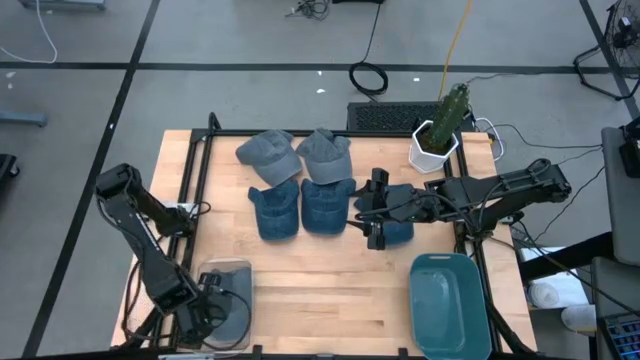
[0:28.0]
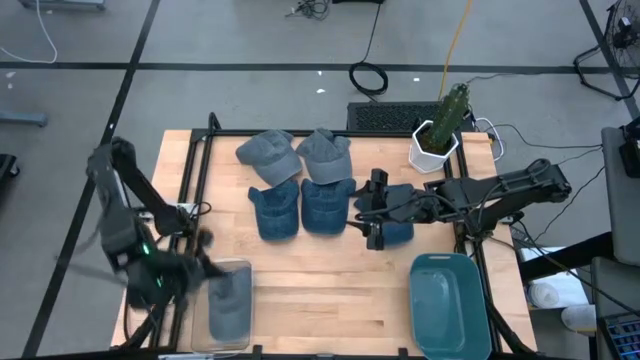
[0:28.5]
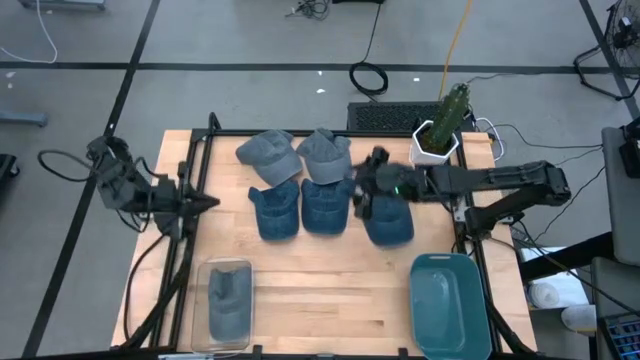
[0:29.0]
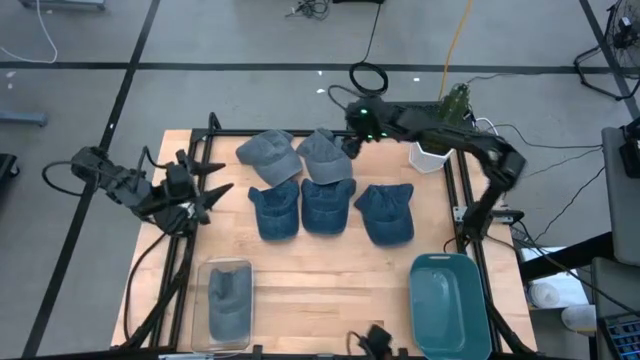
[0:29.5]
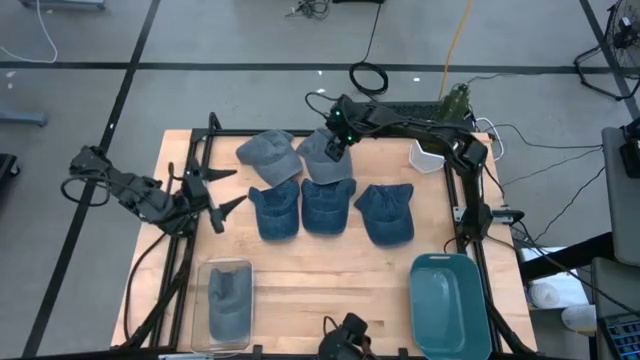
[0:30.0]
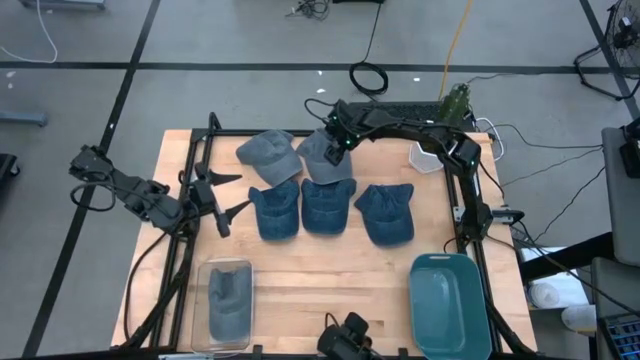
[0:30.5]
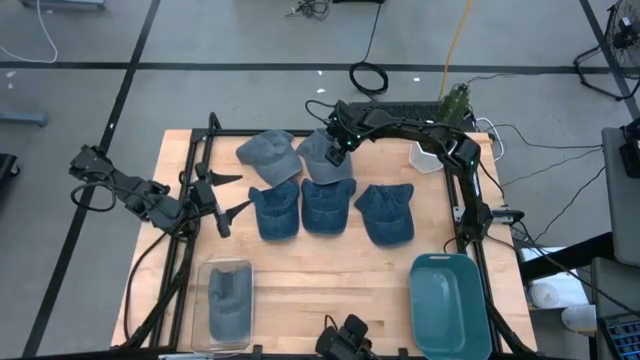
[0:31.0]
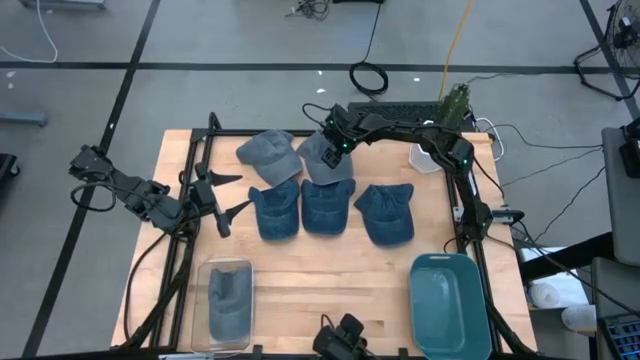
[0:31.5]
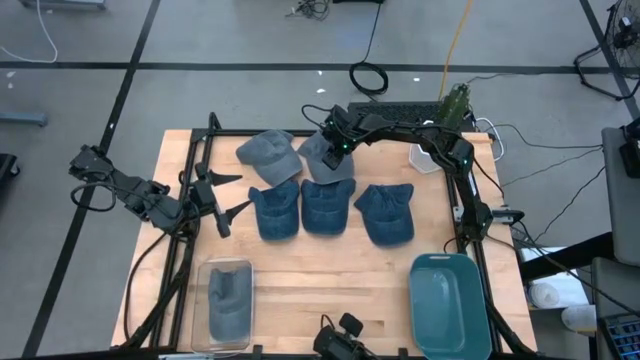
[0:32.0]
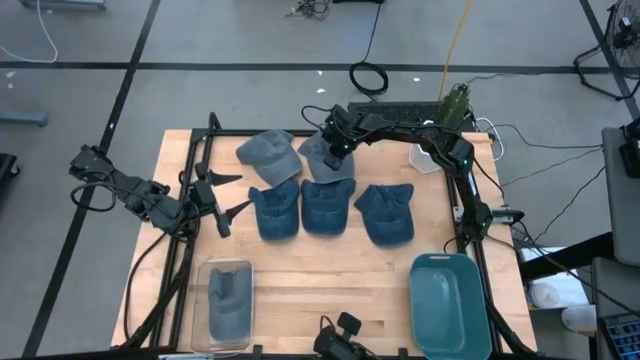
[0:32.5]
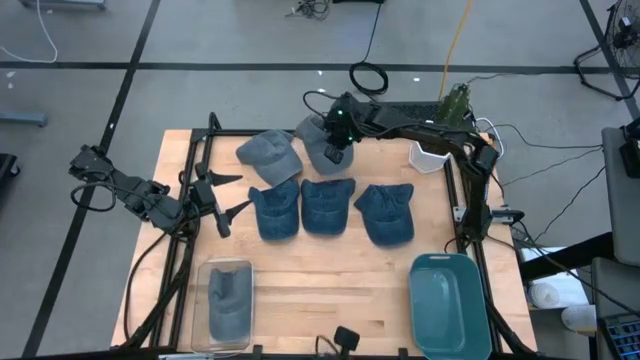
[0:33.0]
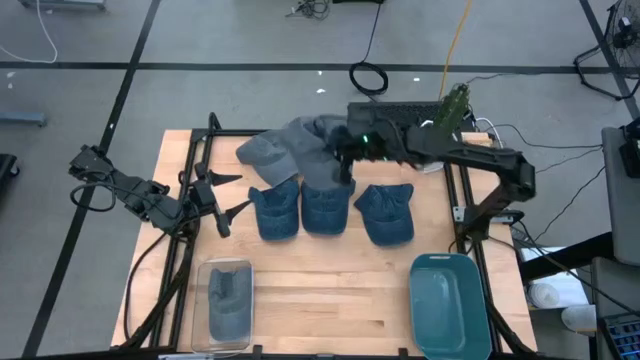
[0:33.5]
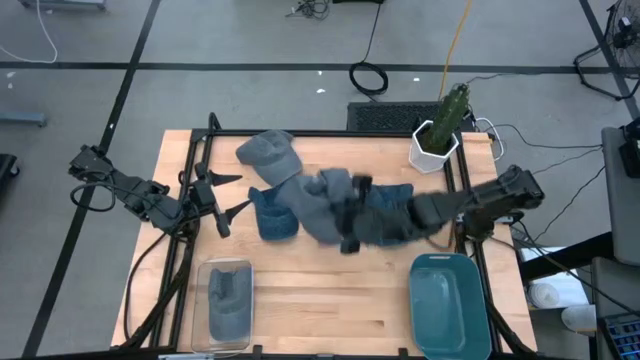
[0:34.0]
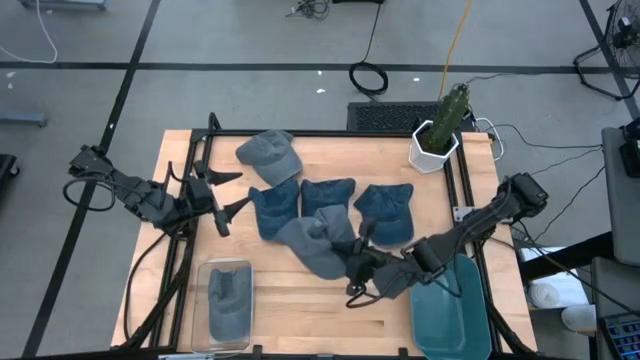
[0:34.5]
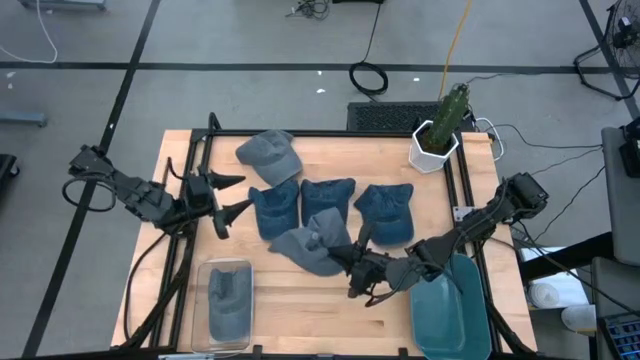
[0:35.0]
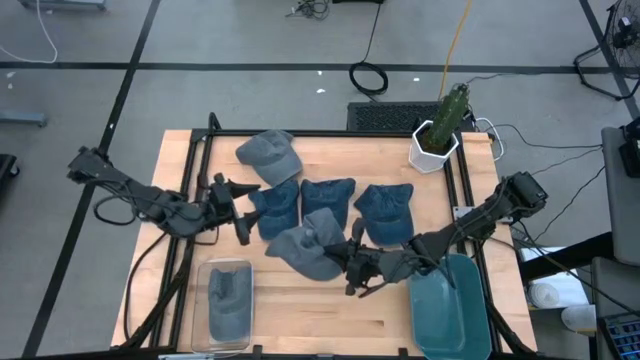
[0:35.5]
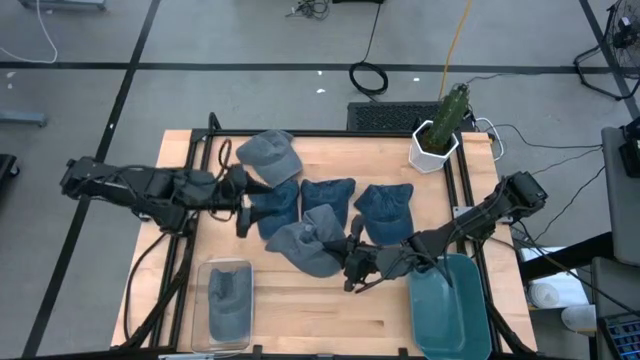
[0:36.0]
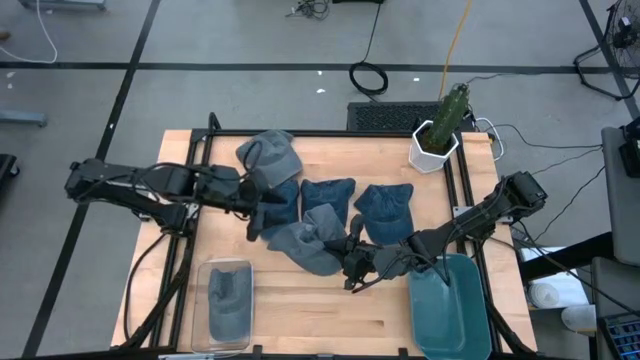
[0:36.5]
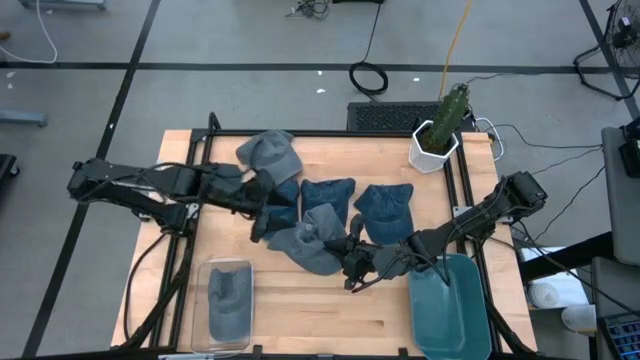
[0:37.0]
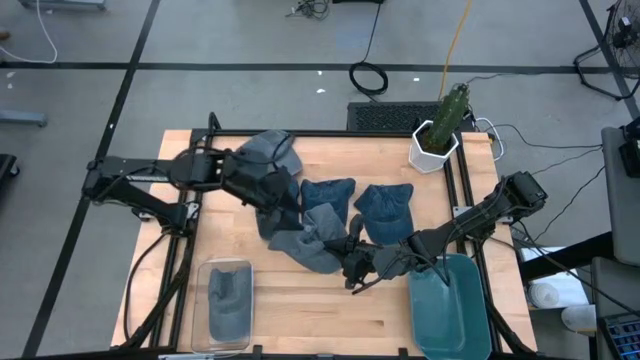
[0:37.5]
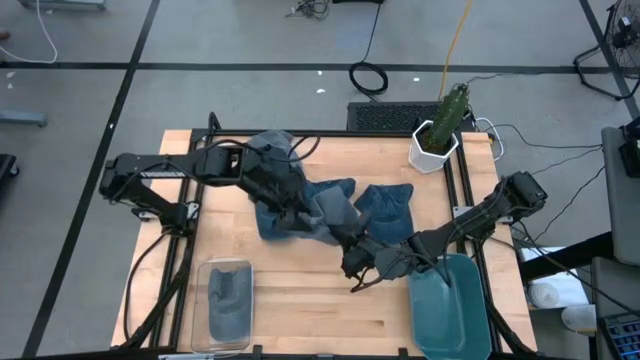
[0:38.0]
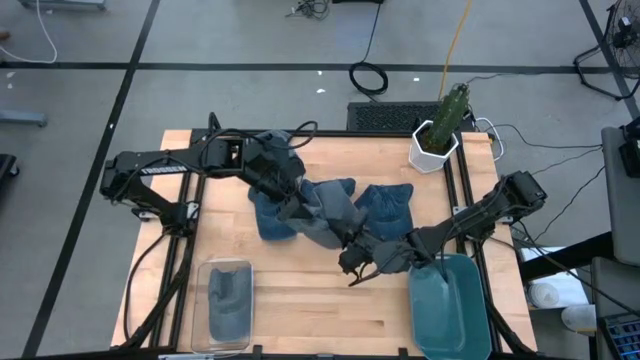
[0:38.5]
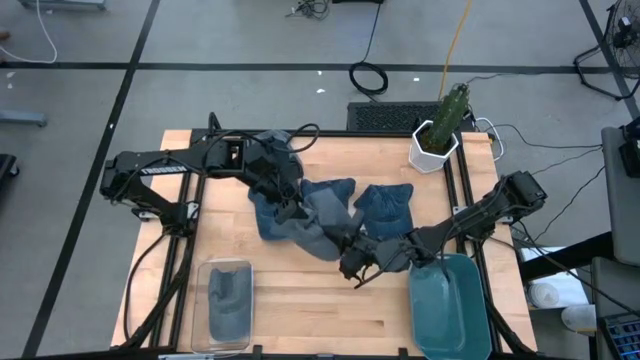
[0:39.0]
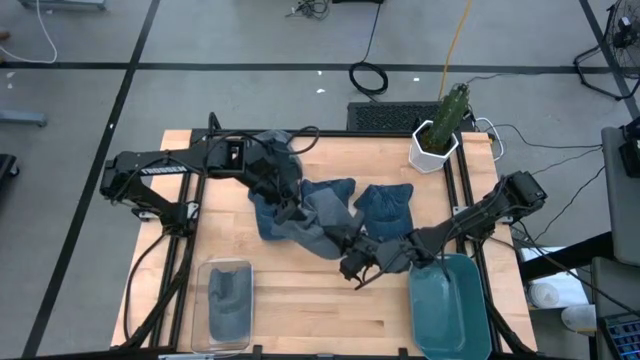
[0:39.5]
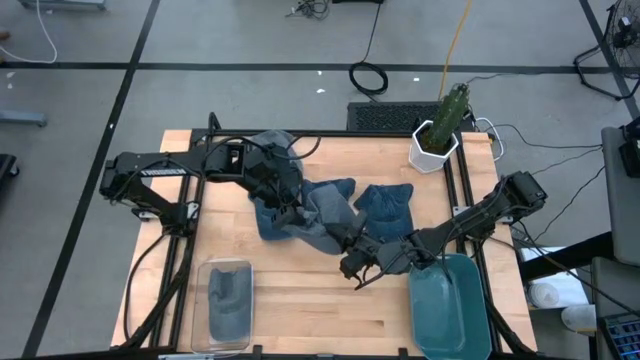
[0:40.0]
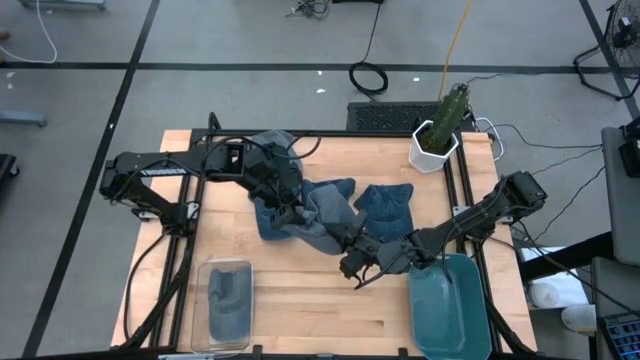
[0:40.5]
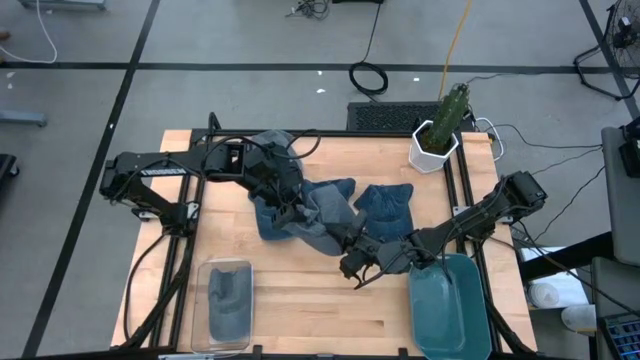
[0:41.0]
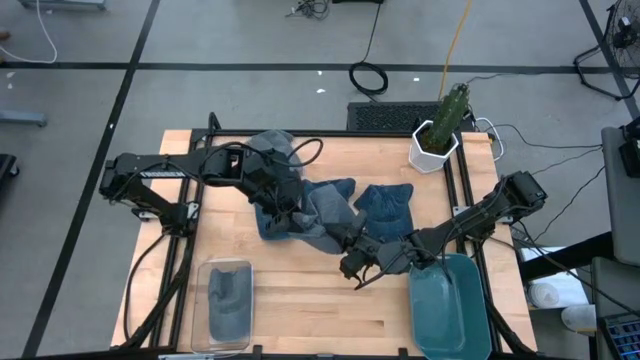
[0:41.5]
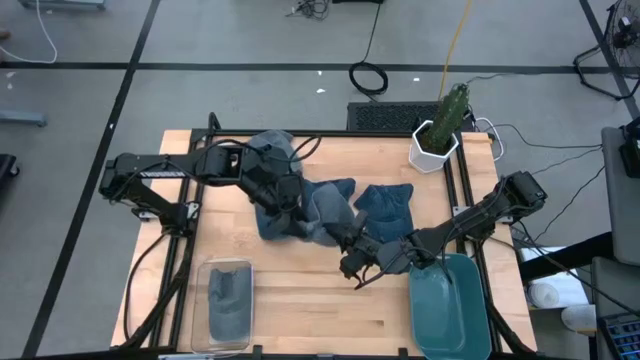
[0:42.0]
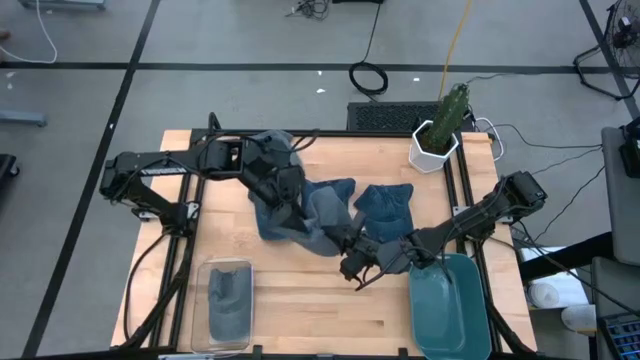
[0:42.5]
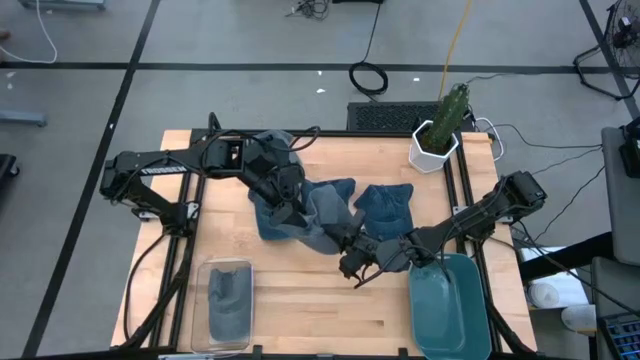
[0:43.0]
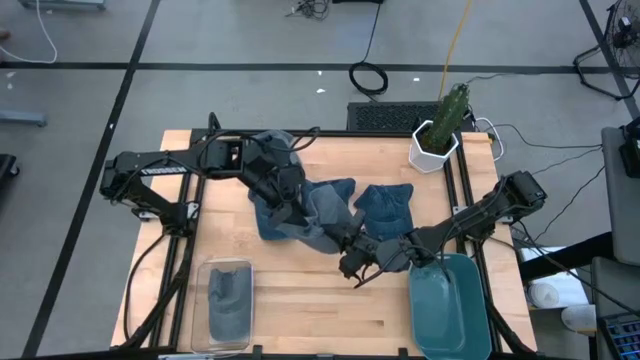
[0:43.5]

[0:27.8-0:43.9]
Task: Pick & Place hat
Put the right gray cap into the transparent bin
